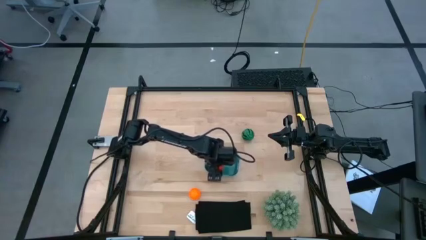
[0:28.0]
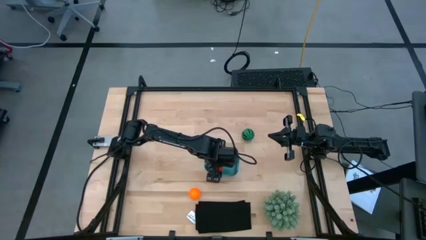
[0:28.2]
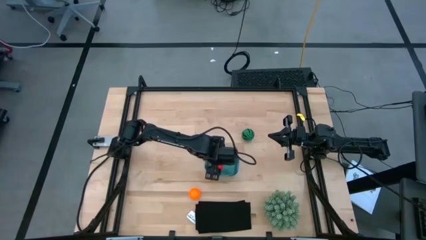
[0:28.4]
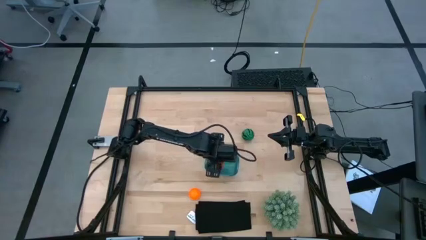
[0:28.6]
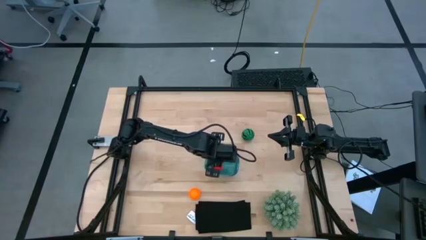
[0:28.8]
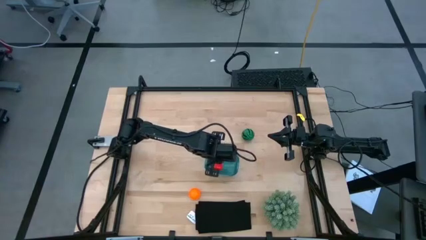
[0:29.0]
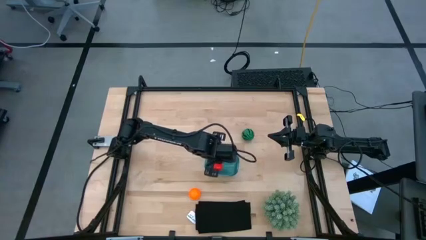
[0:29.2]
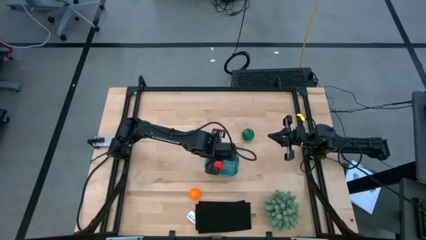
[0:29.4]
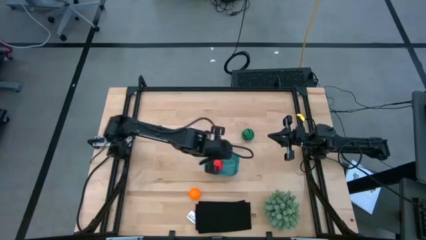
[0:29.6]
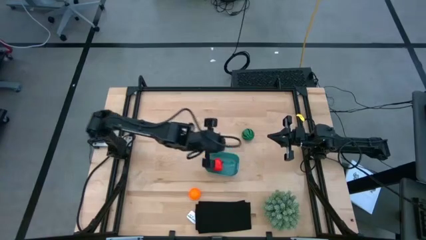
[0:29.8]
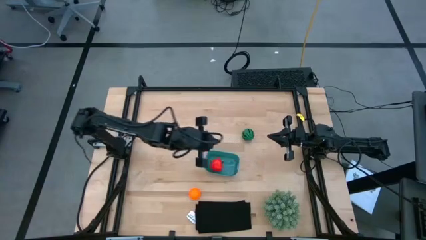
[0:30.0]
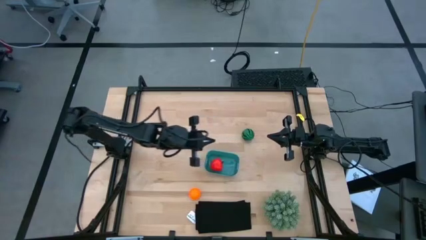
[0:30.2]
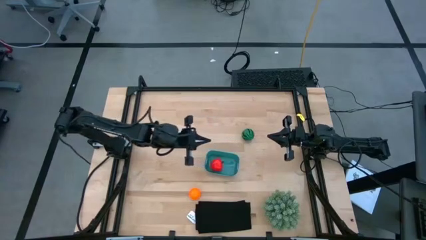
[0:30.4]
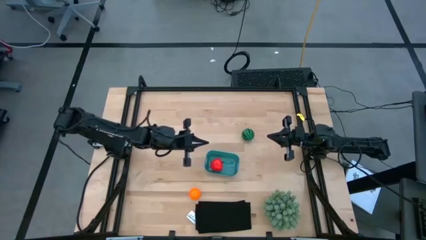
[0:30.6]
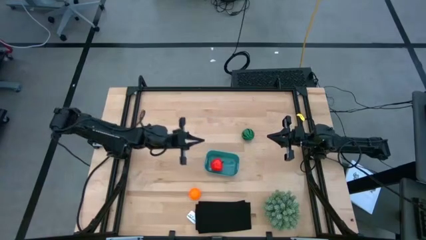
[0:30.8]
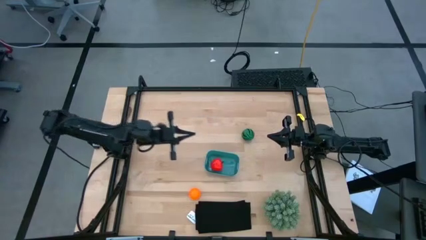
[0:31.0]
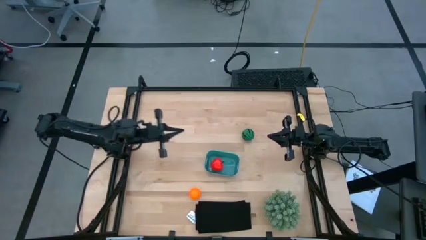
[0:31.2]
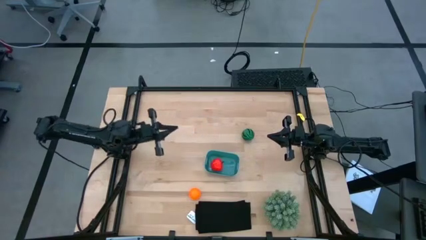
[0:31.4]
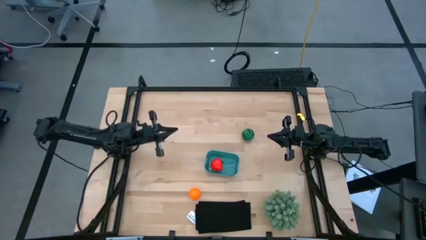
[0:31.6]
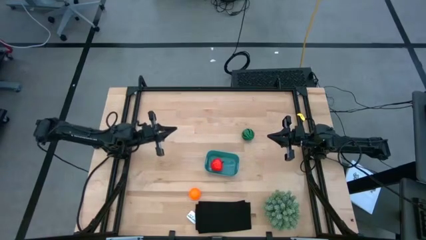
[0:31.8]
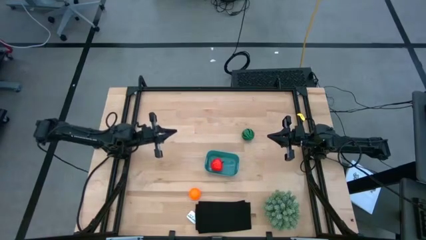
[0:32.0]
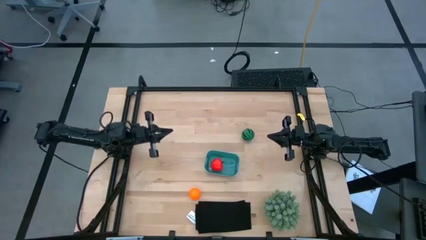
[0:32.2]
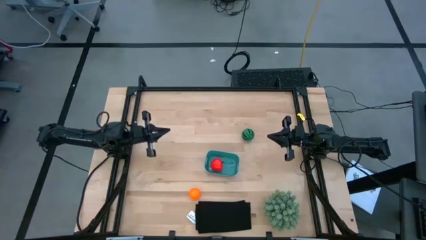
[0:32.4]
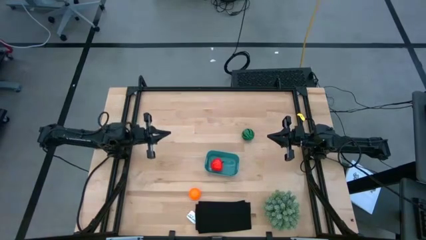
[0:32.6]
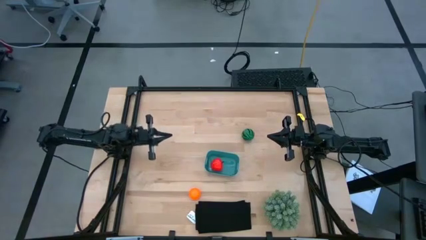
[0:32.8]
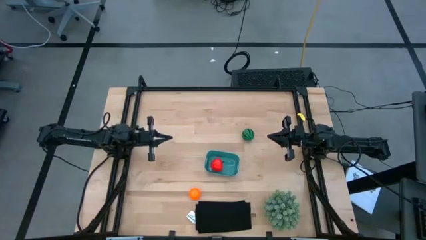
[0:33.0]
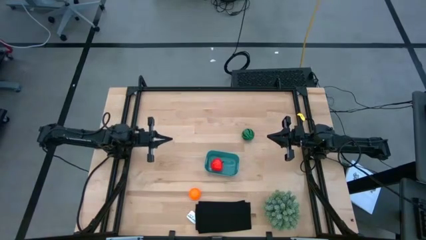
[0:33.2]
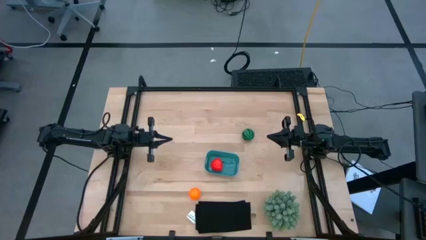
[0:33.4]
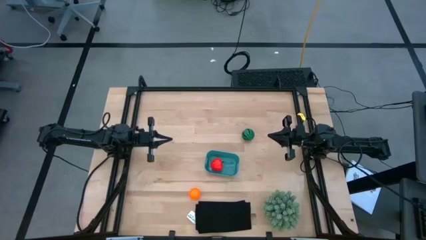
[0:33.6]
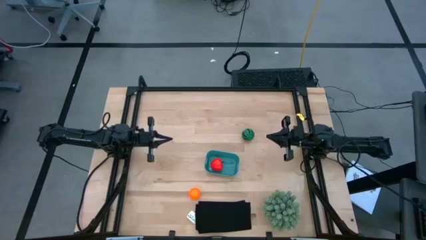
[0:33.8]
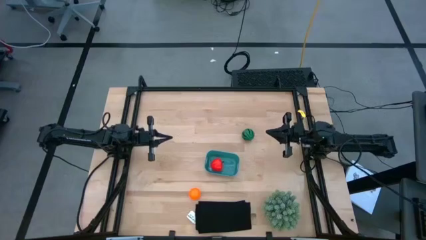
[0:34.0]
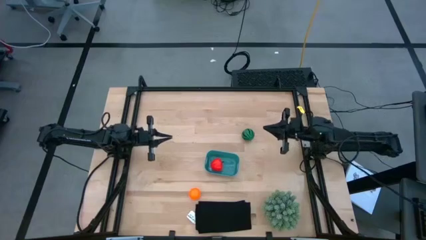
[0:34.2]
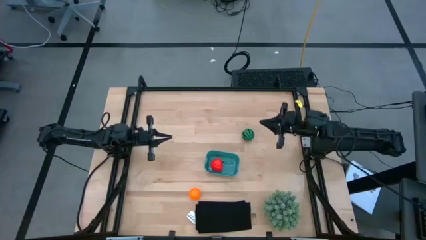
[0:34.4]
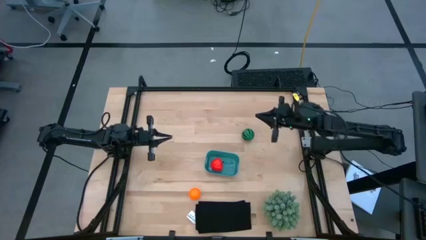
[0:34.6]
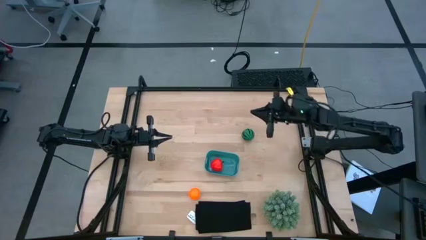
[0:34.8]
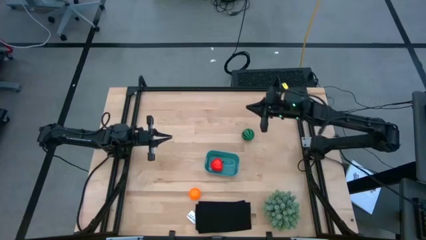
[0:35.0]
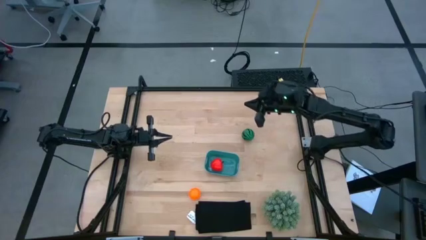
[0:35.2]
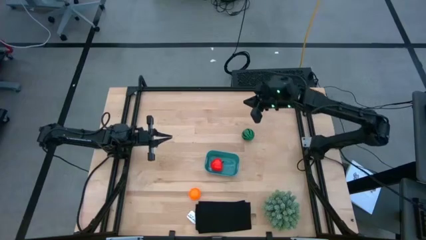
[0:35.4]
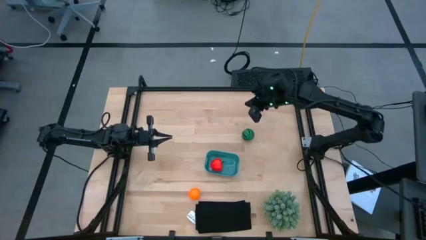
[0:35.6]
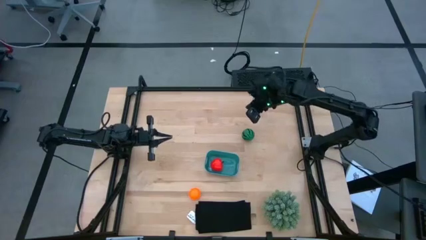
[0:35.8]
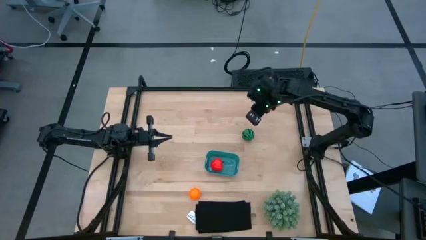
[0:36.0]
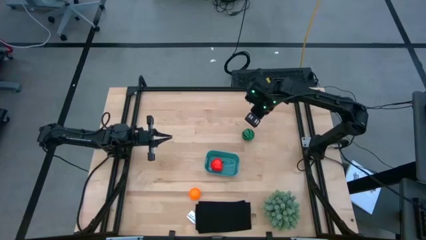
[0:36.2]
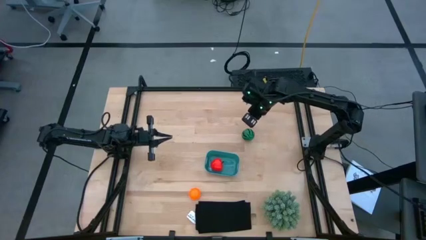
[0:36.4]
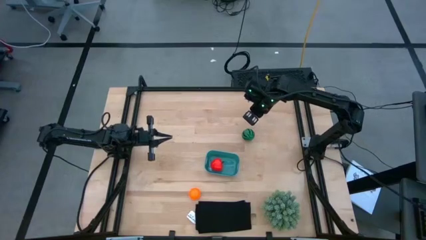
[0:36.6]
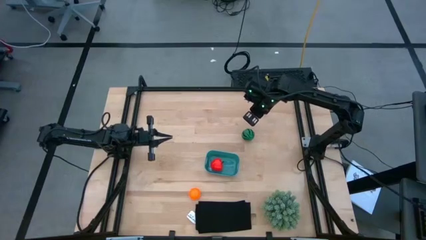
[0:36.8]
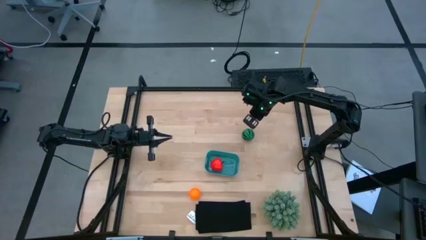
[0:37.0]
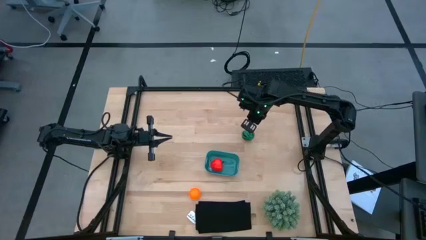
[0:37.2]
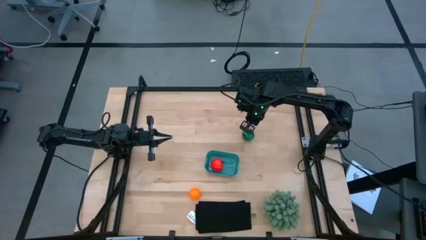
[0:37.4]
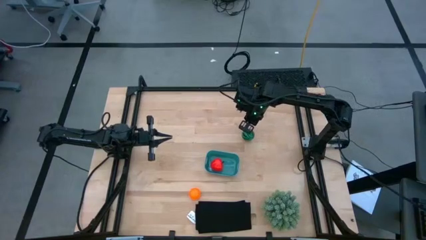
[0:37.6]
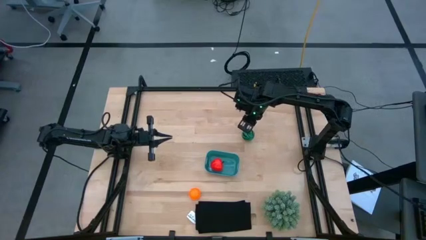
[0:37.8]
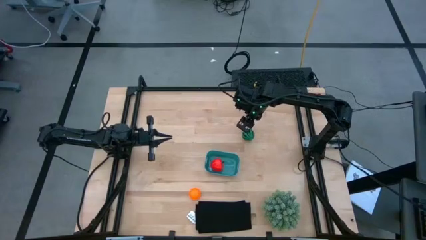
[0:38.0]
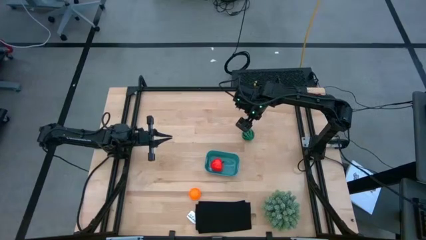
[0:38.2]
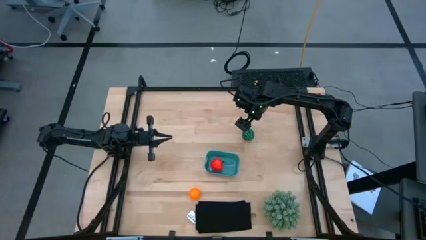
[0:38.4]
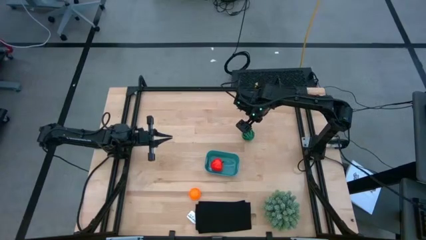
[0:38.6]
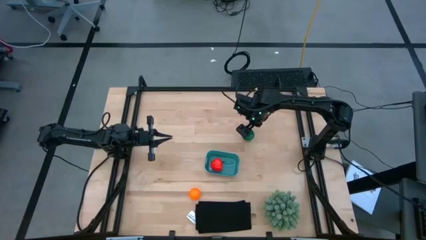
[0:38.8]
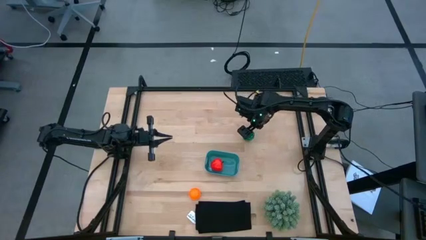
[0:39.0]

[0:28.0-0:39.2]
Task: Pick and placing Produce into tupperware
Put the green watermelon into the blue container
